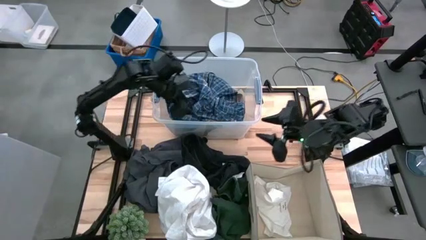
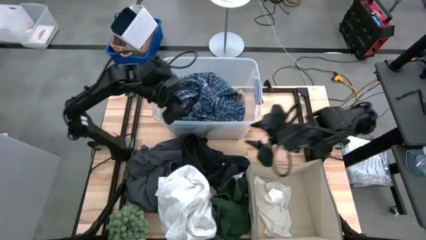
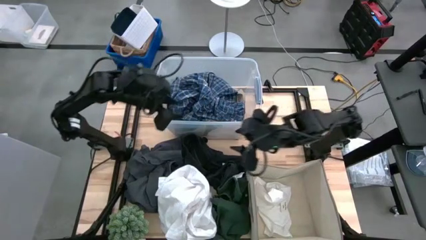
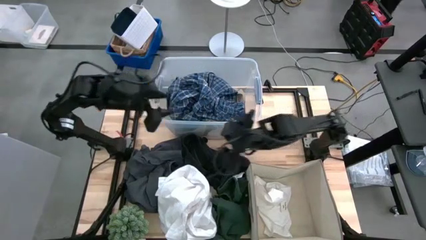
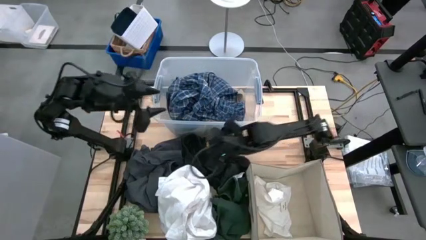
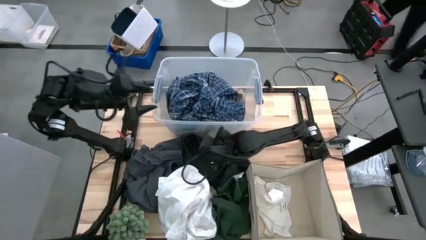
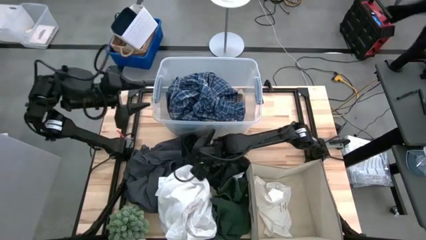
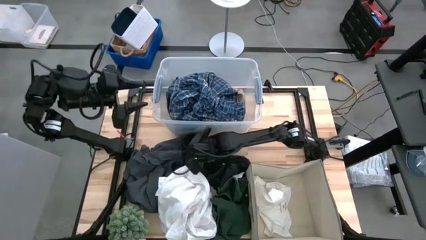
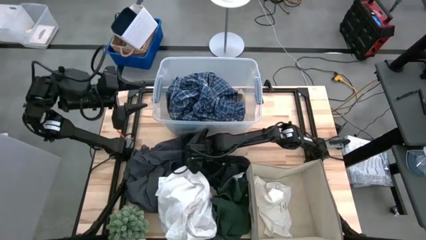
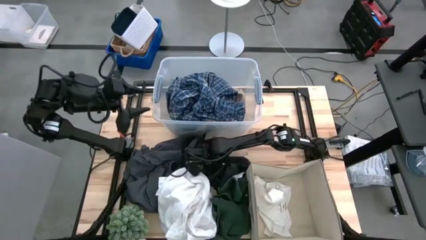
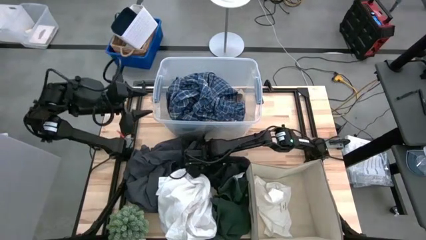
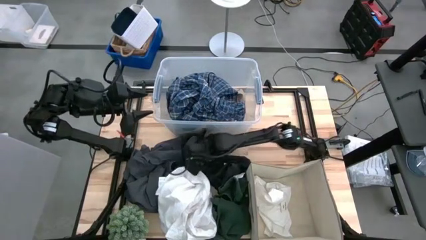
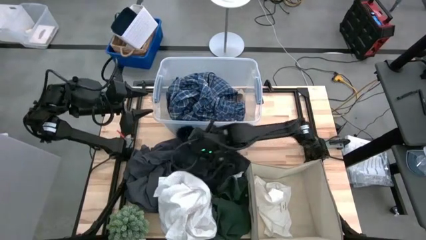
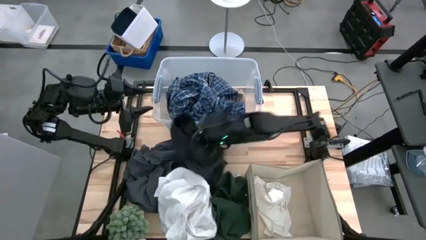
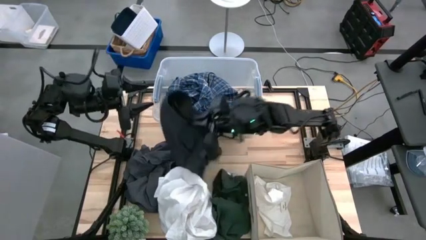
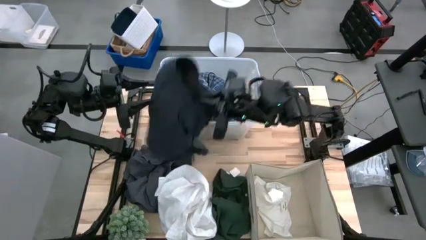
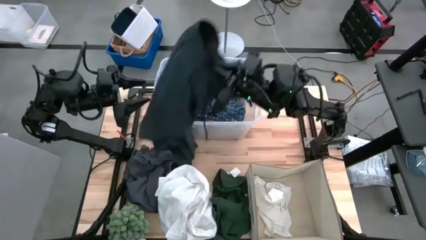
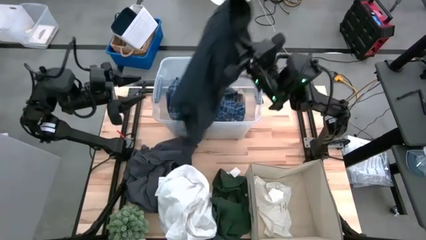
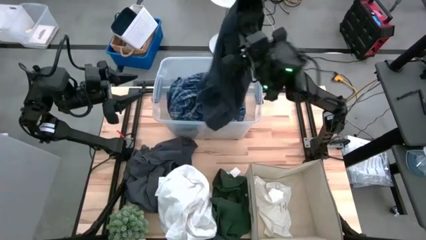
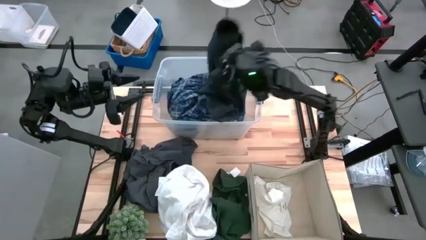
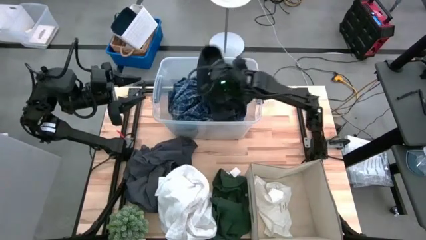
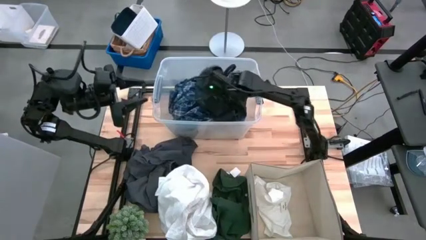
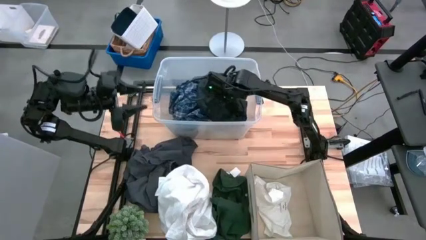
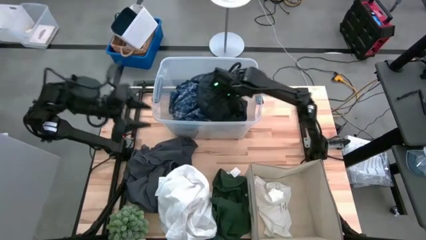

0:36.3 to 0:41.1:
Task: Sort clothes
Put the black shorts into the transparent bin

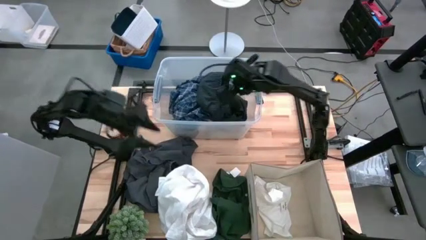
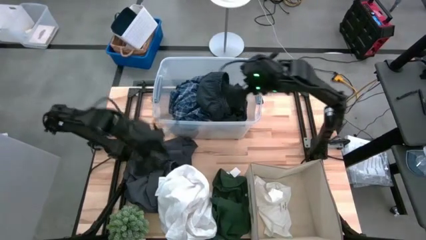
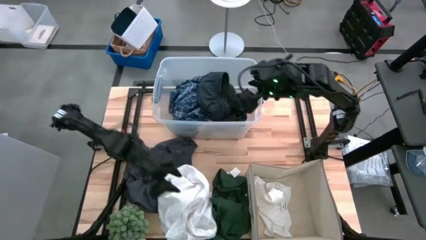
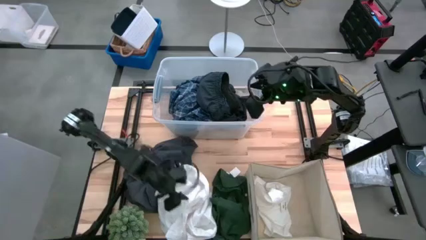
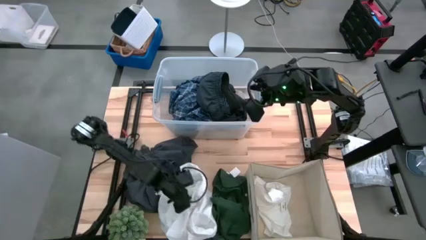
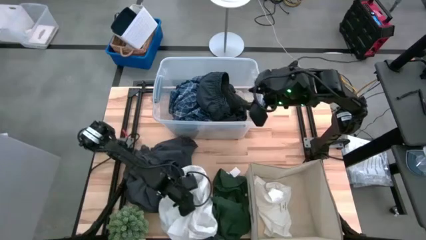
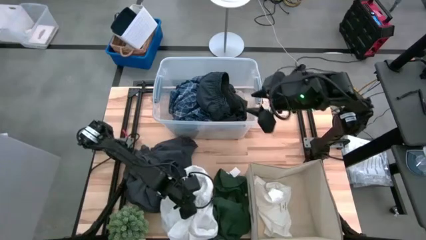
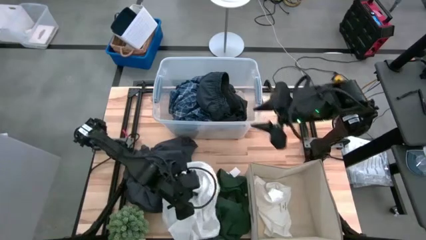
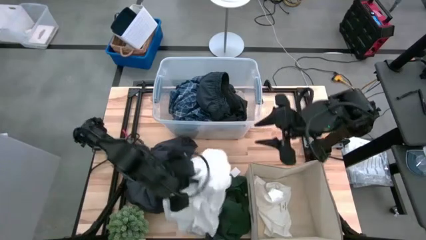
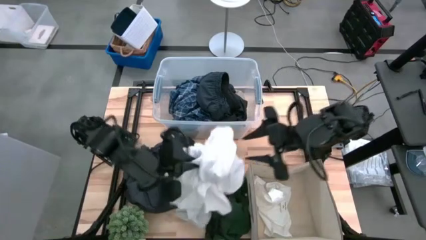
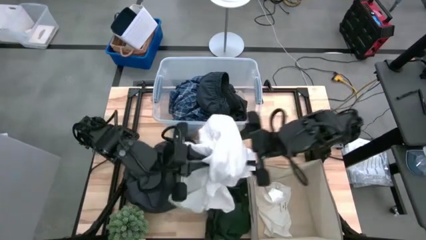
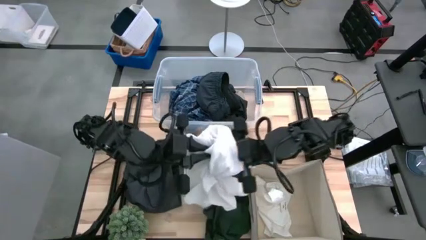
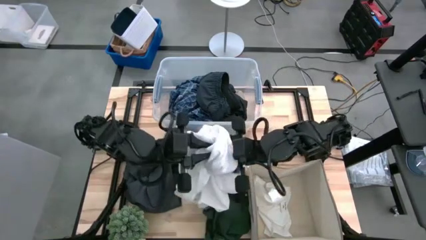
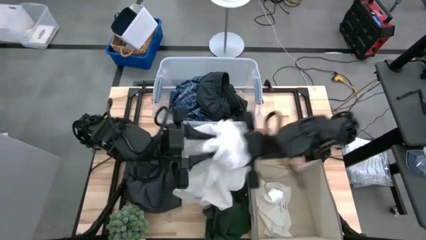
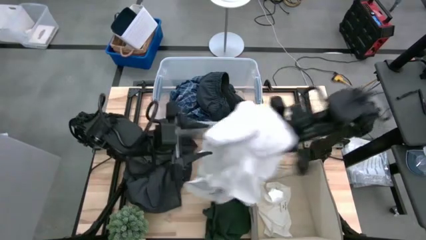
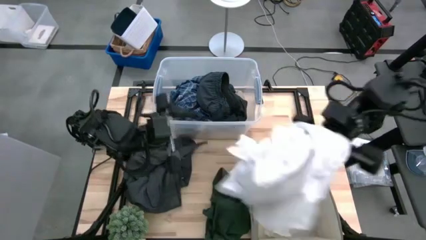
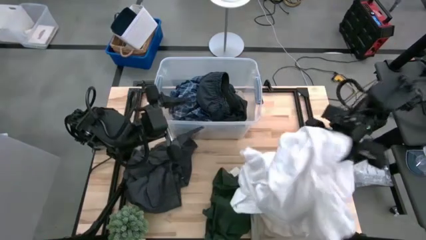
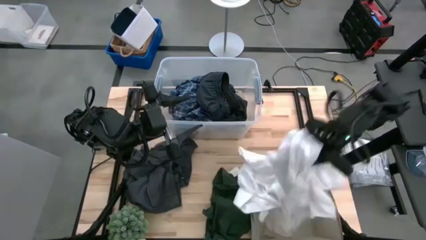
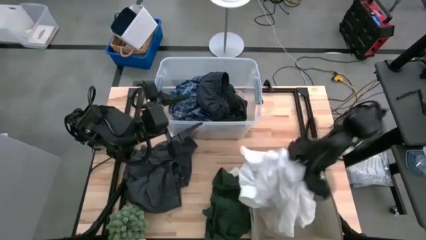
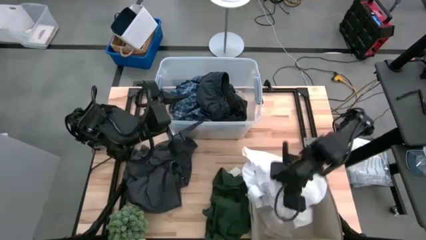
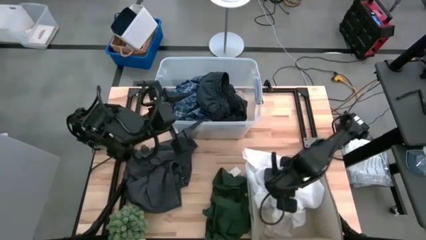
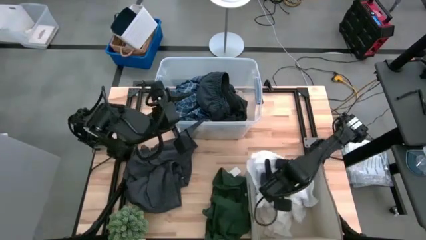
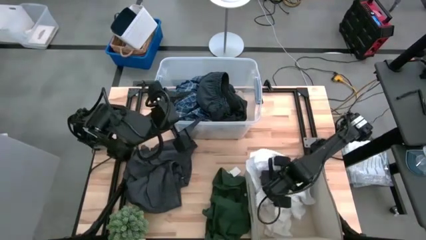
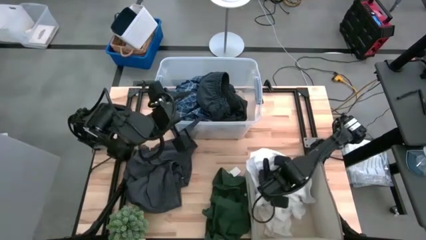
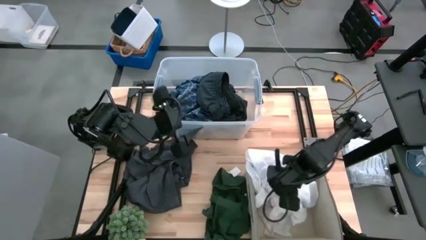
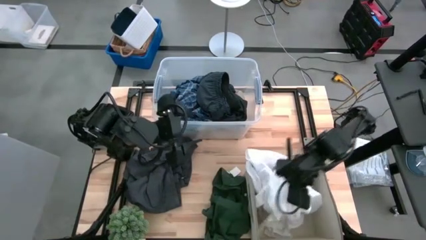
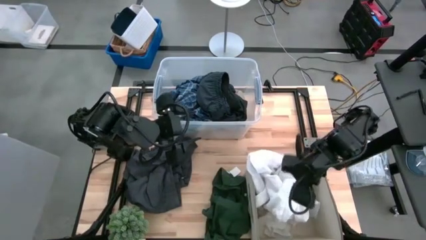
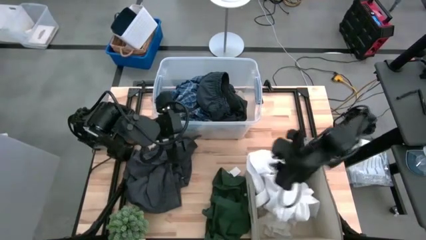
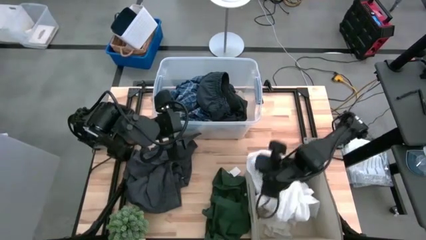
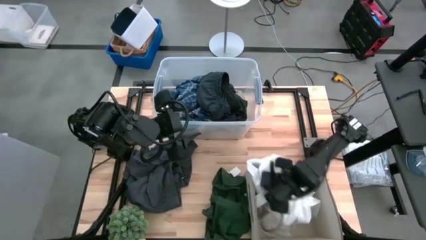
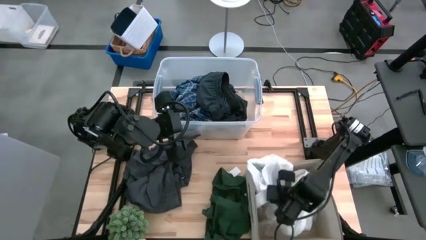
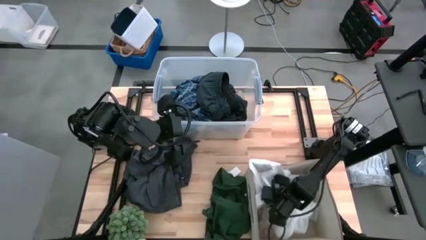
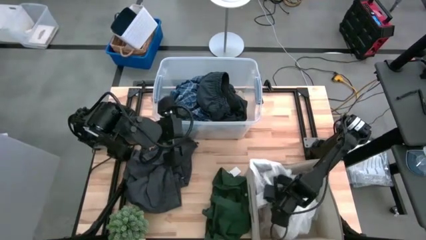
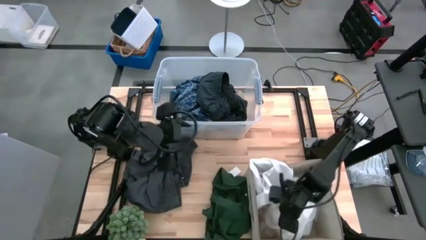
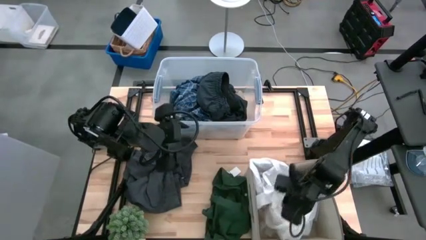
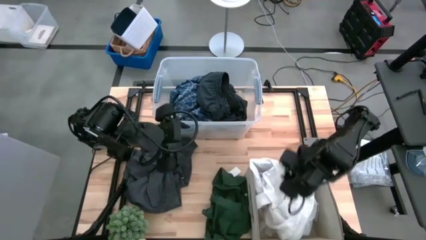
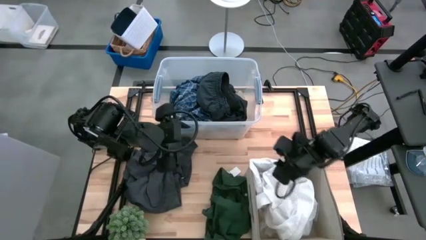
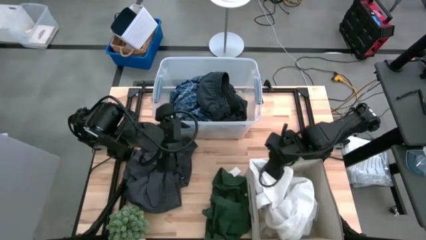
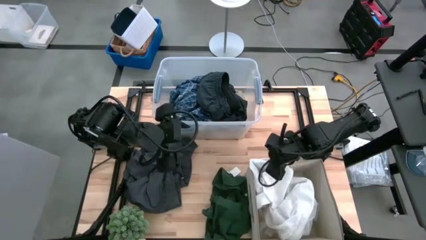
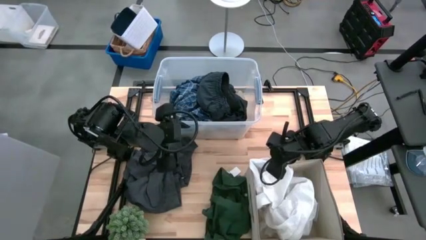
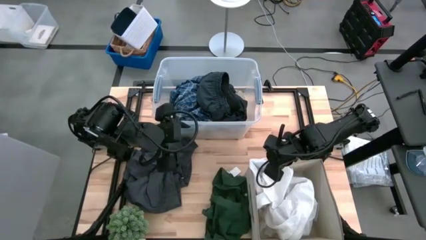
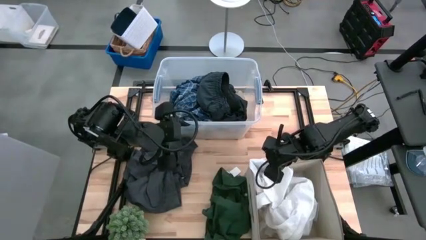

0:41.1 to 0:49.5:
Put the white long sleeve into the brown laundry organizer

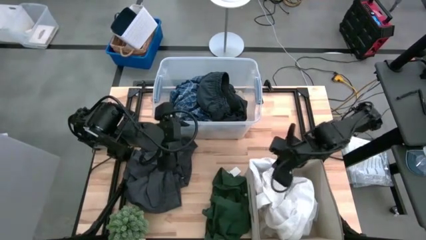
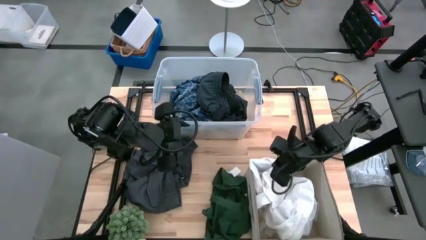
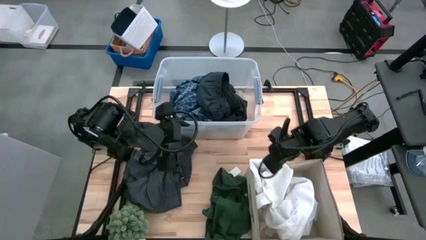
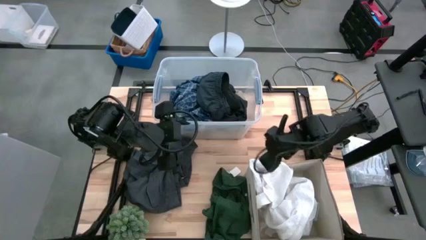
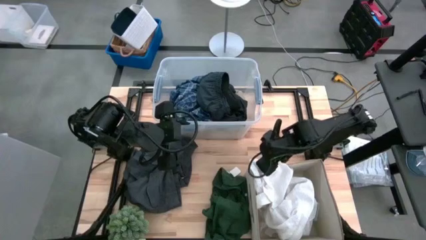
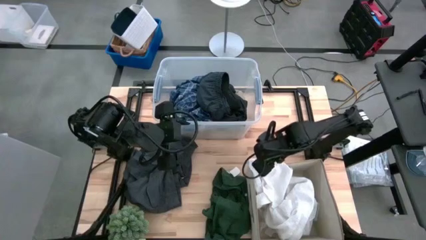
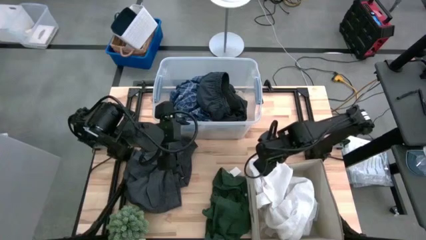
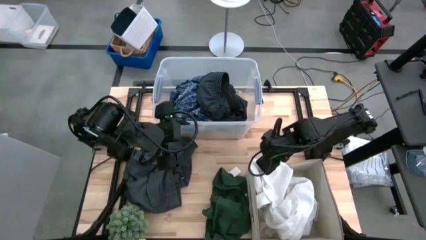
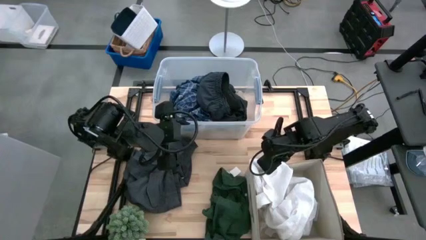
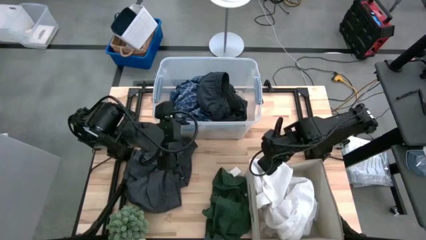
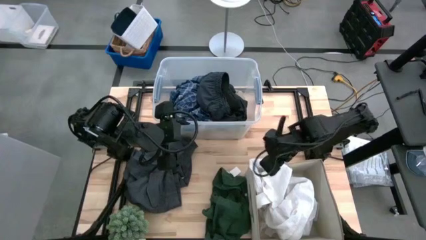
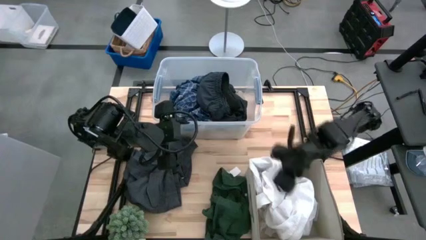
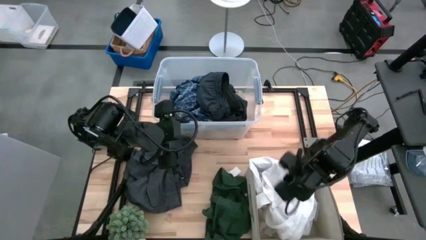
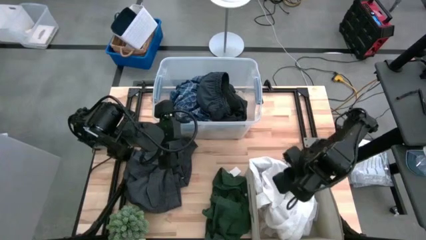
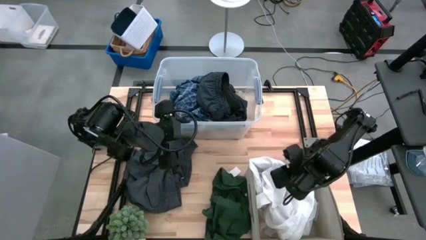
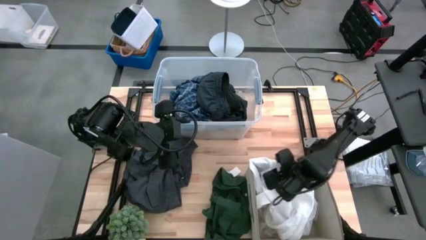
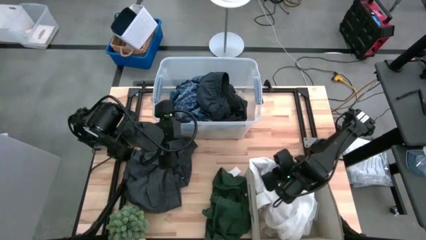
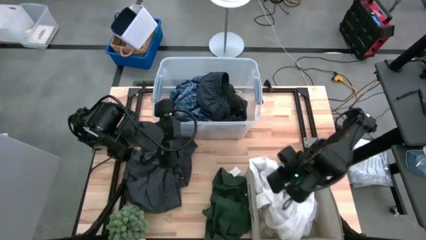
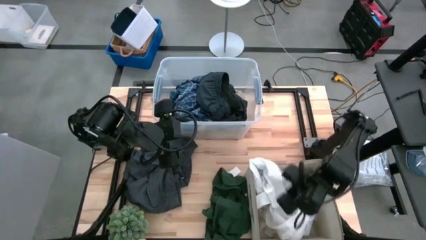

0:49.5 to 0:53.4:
Put the white long sleeve into the brown laundry organizer
